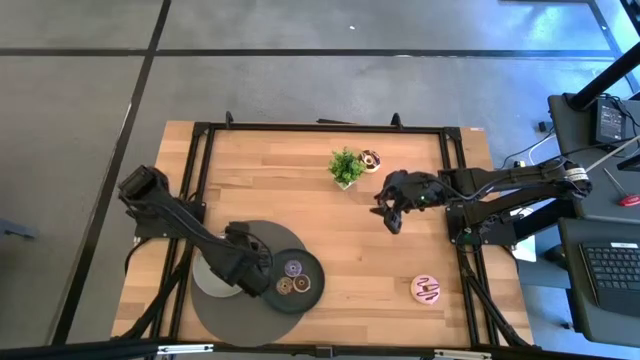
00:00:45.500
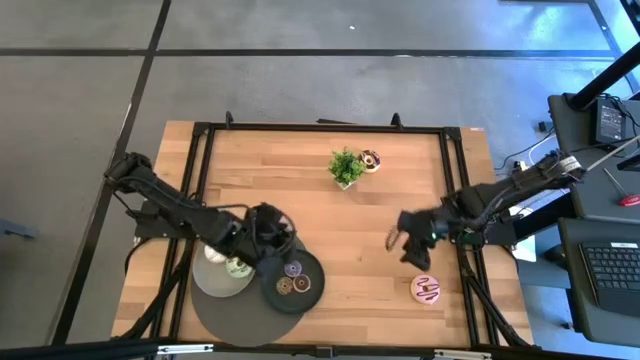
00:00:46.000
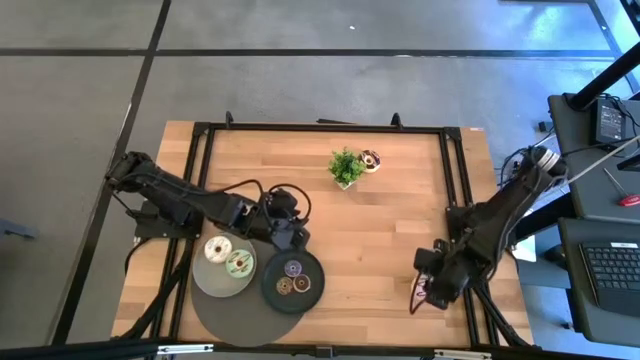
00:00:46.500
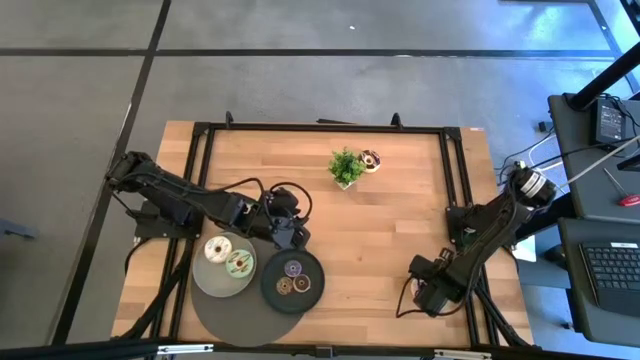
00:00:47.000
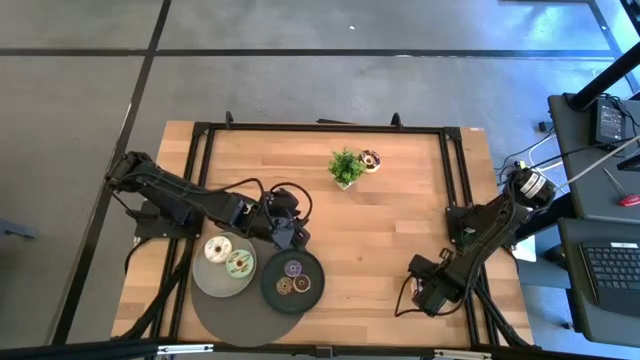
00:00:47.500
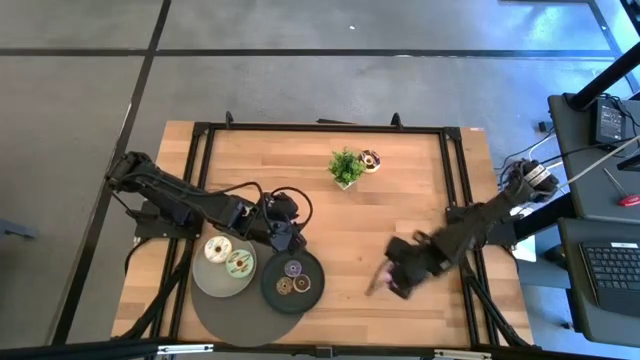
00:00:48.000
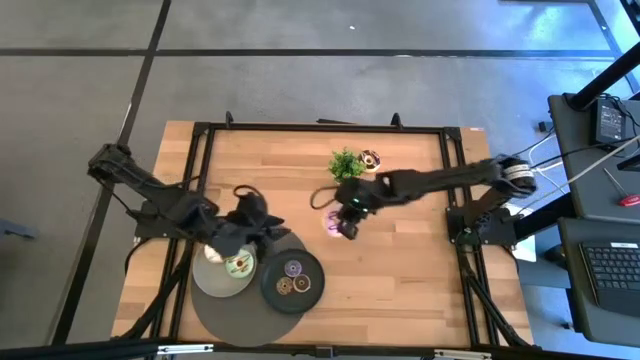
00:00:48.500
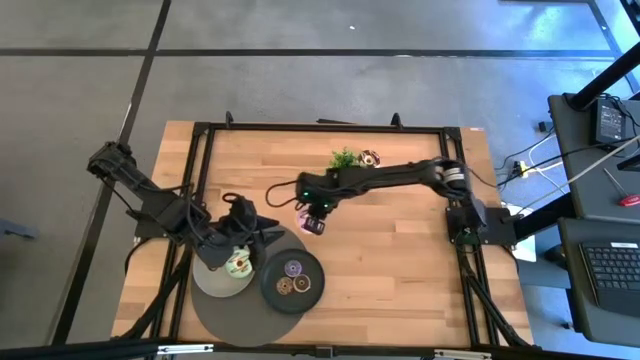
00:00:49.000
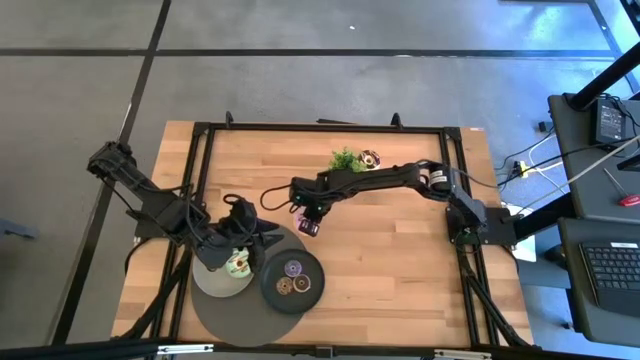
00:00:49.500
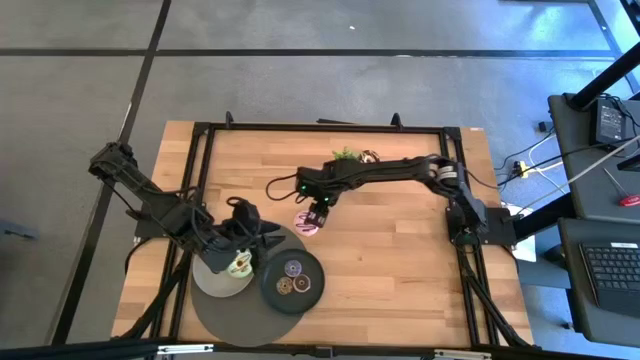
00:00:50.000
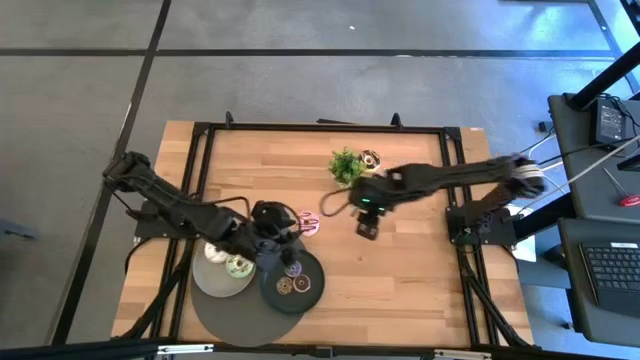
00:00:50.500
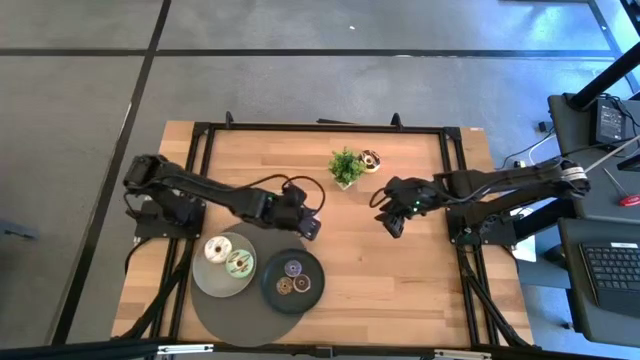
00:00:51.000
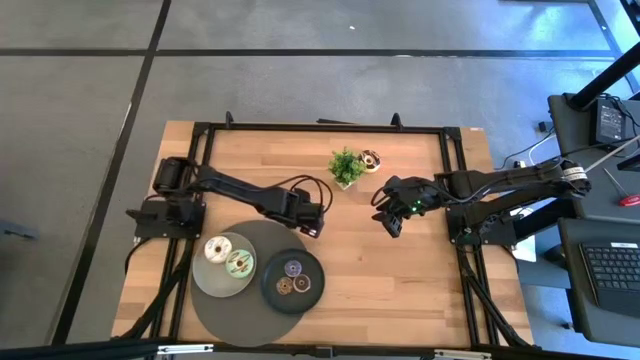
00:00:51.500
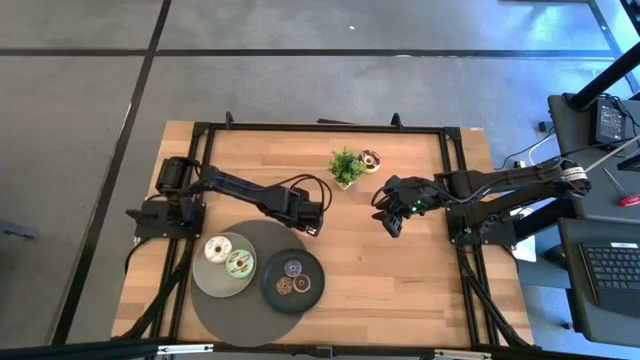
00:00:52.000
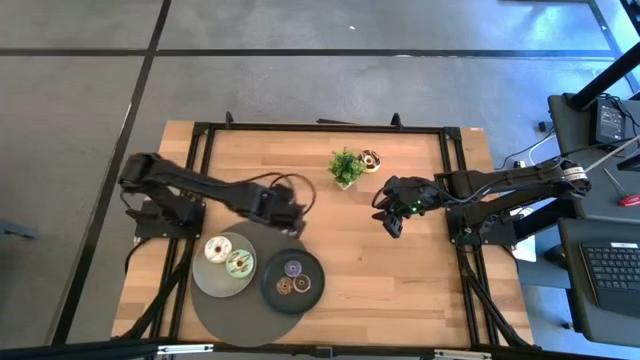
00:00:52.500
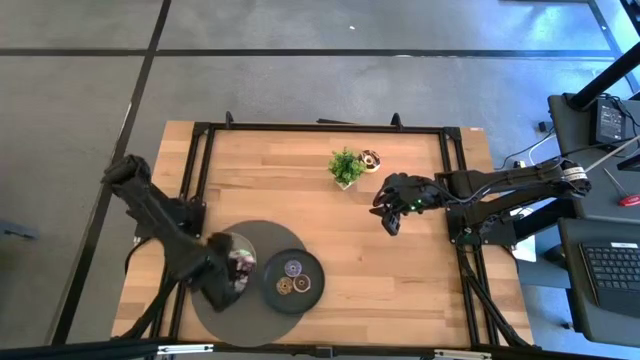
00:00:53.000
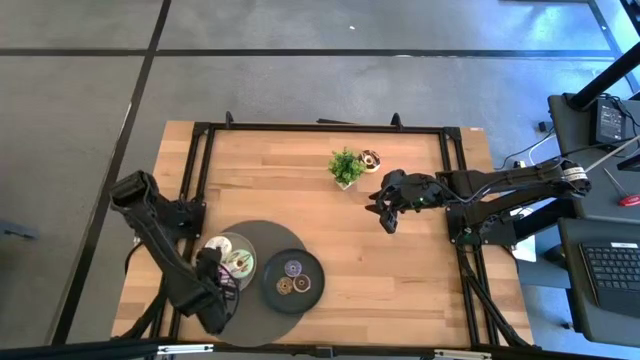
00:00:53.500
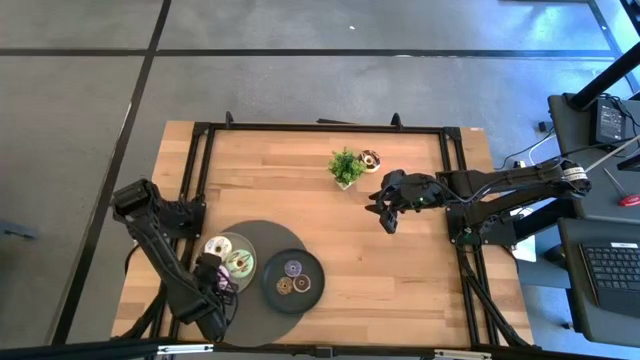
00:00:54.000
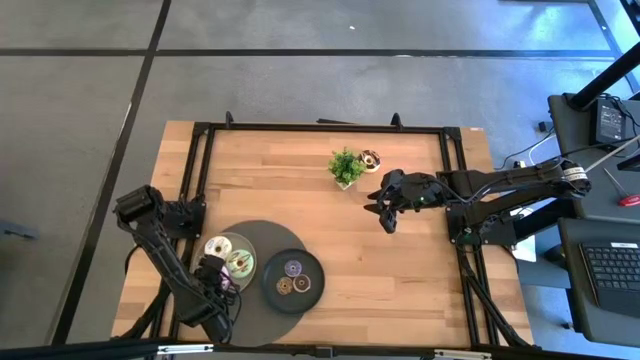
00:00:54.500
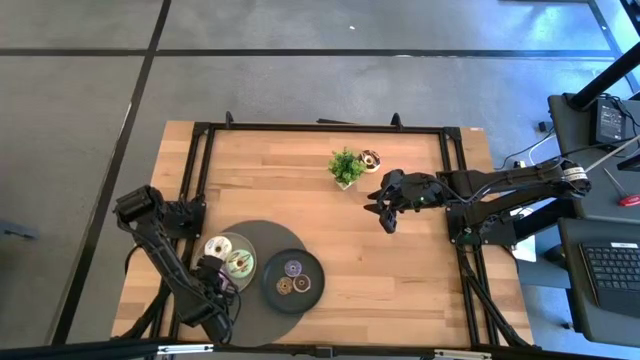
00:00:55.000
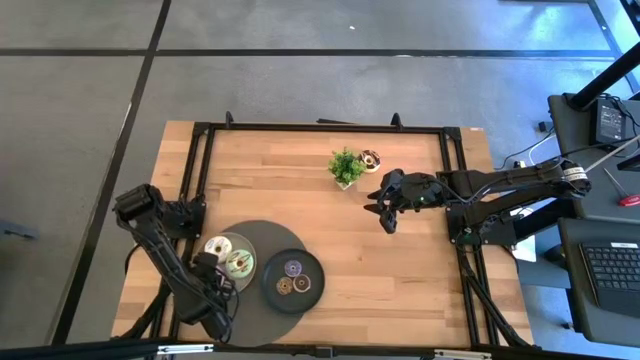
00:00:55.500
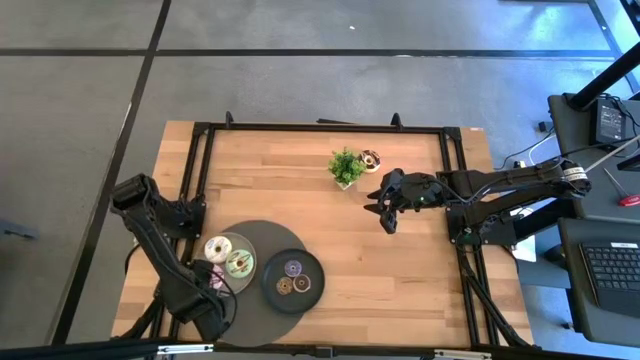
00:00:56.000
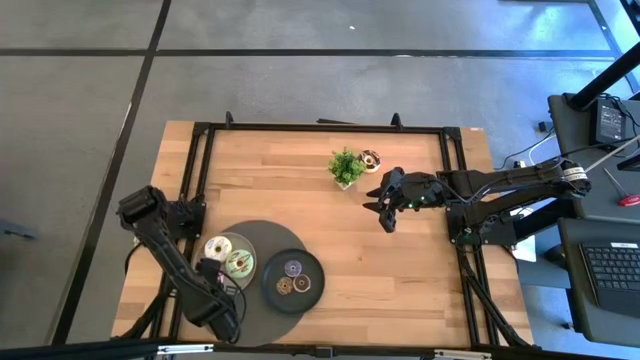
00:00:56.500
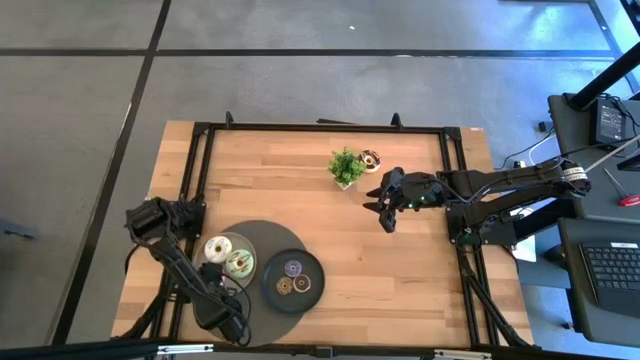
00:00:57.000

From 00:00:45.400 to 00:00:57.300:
Task: Pick & Place donuts
Put the big purple donut on the gray plate

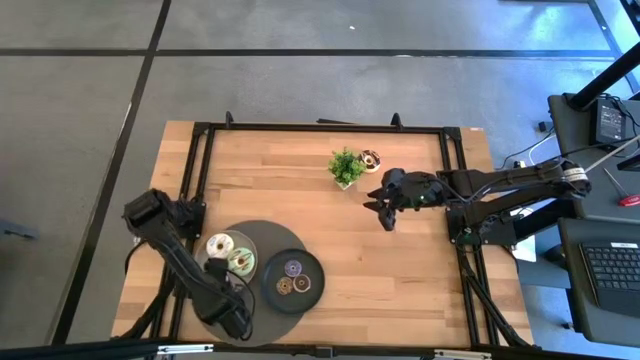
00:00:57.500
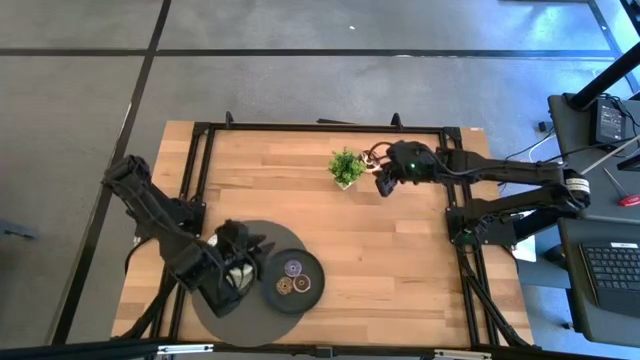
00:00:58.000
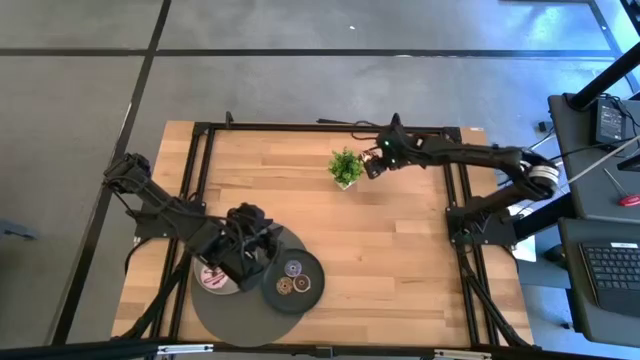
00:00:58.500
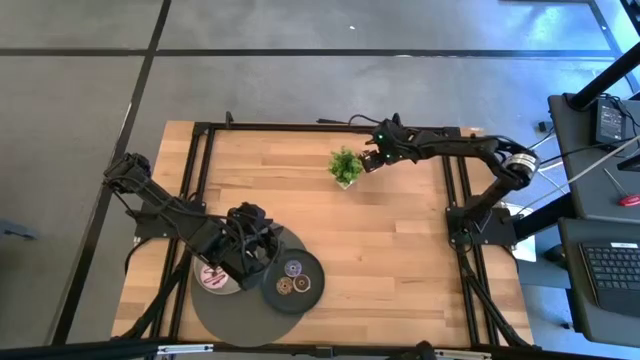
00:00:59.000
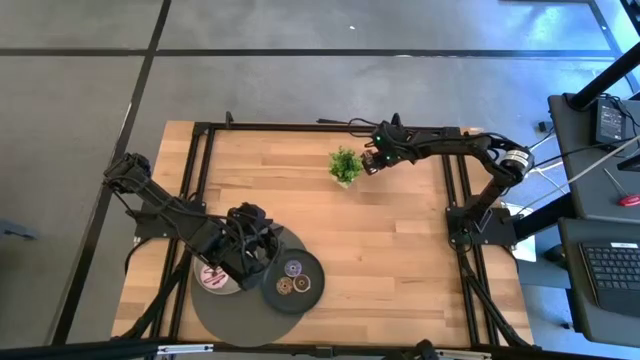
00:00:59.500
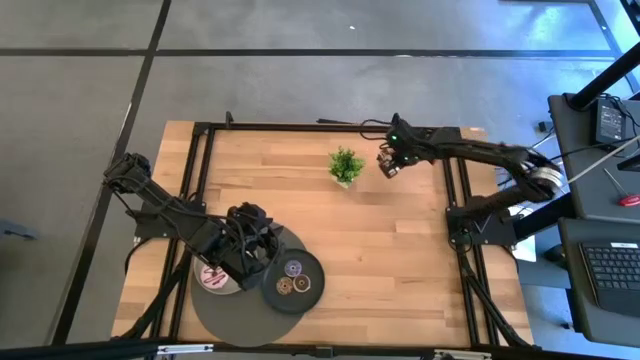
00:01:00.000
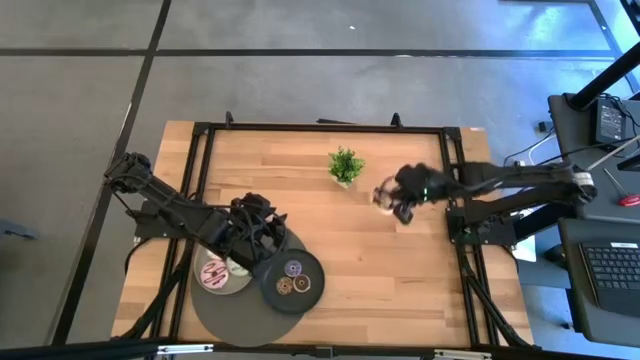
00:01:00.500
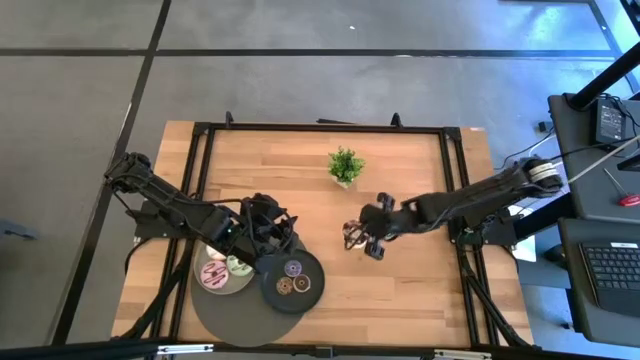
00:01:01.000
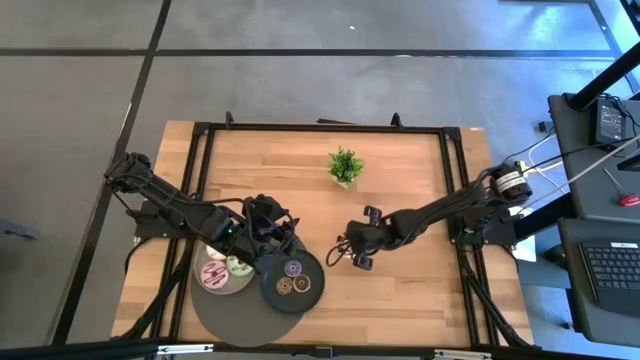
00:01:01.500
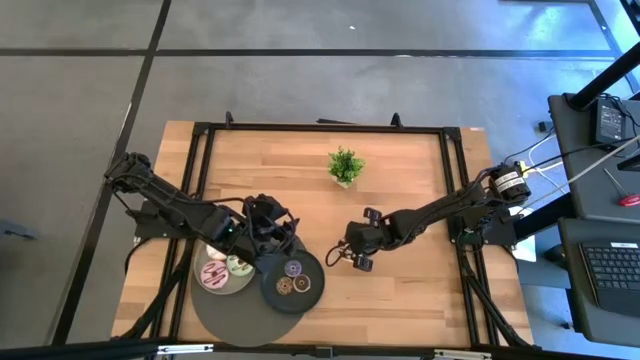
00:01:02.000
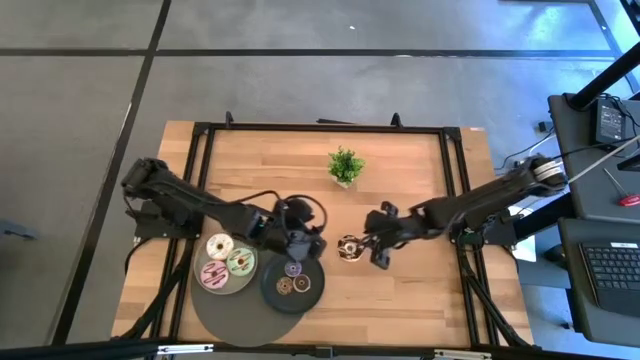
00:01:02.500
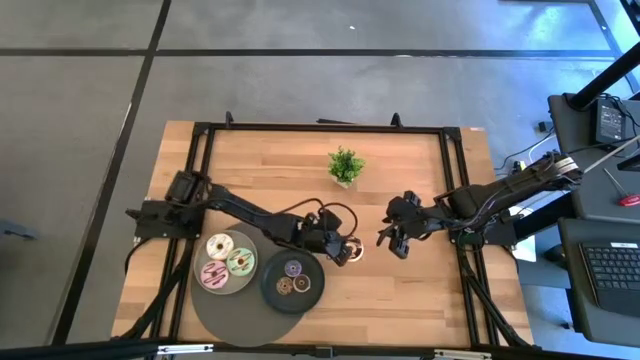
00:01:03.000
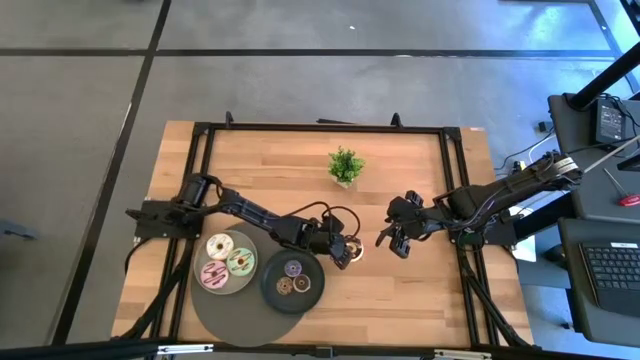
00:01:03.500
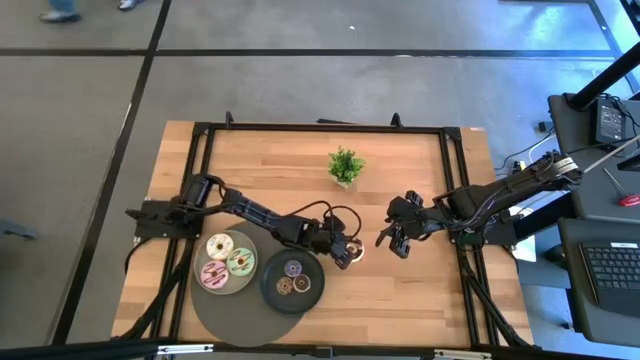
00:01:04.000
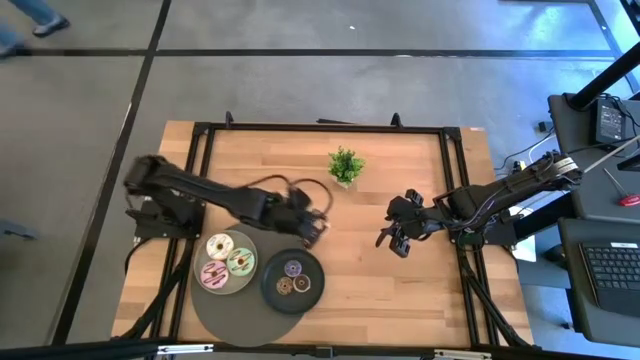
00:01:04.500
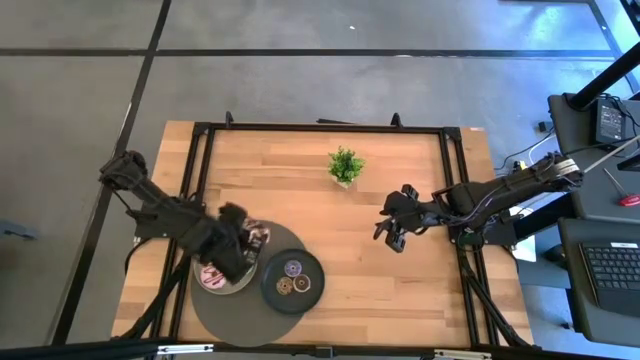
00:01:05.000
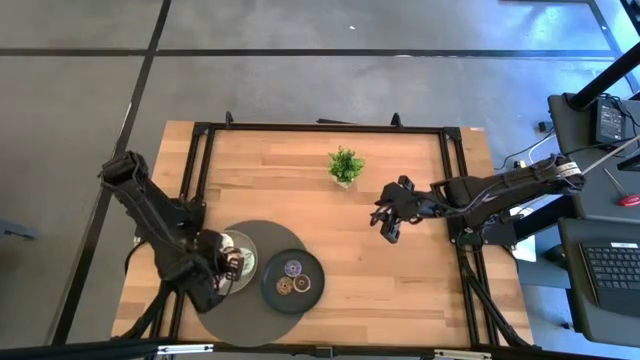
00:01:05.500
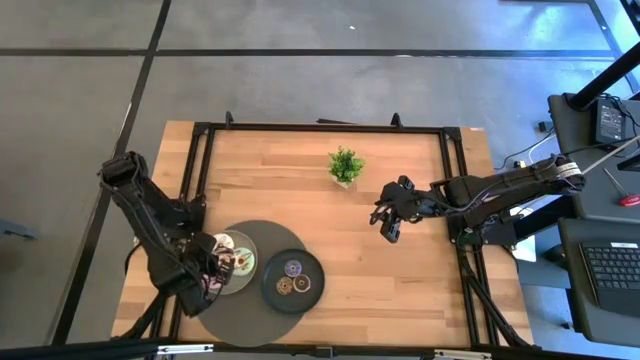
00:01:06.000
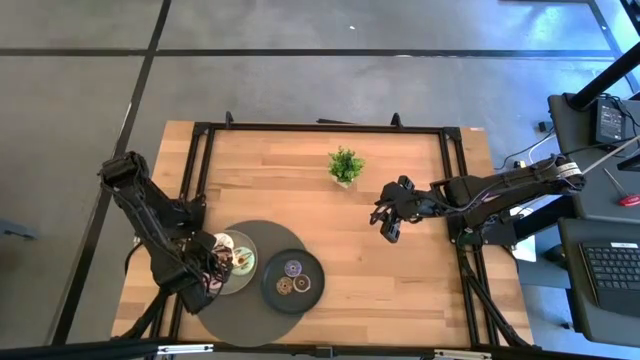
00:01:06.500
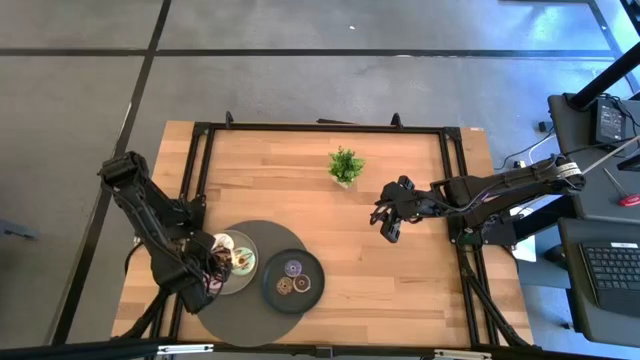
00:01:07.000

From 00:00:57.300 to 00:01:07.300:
Put the big black donut on the gray plate
